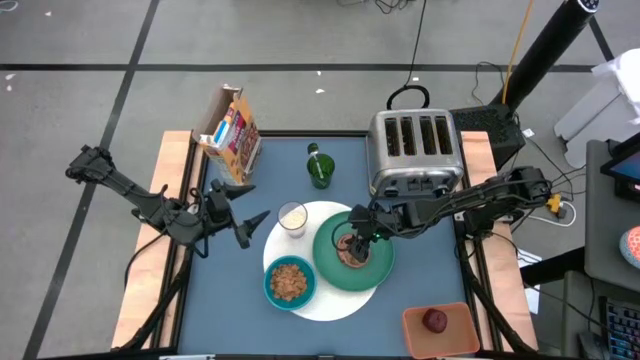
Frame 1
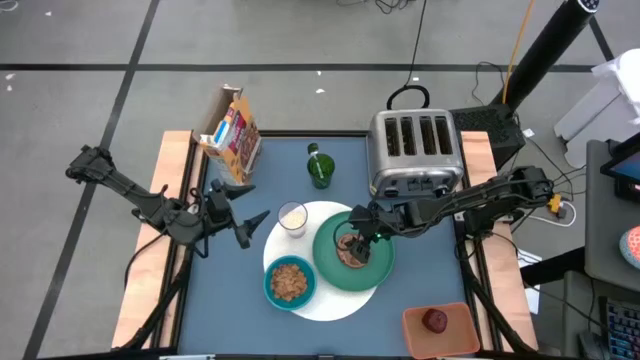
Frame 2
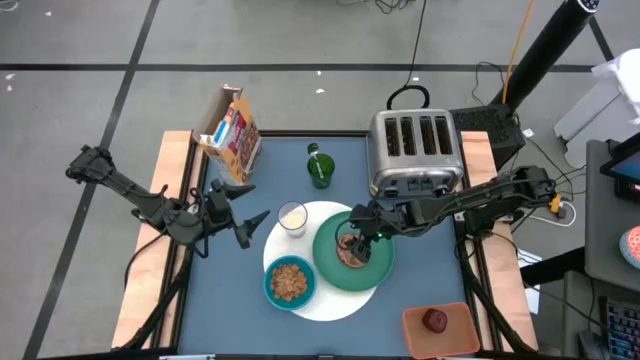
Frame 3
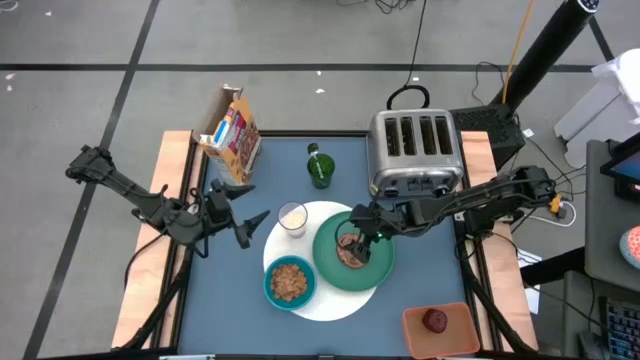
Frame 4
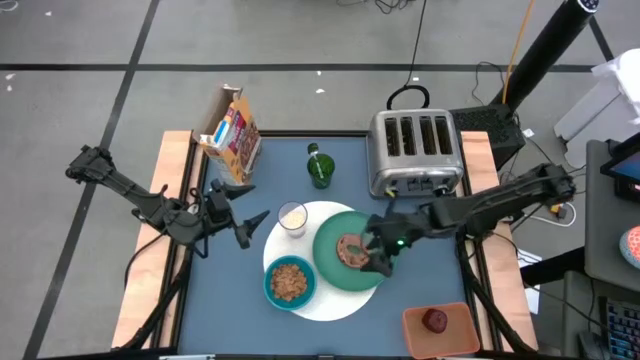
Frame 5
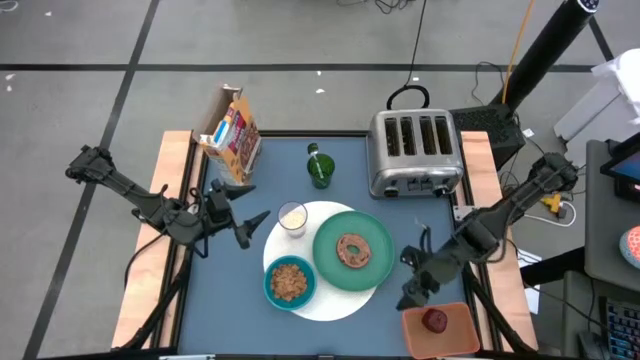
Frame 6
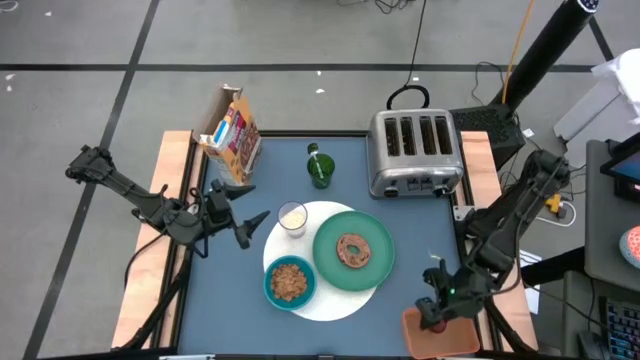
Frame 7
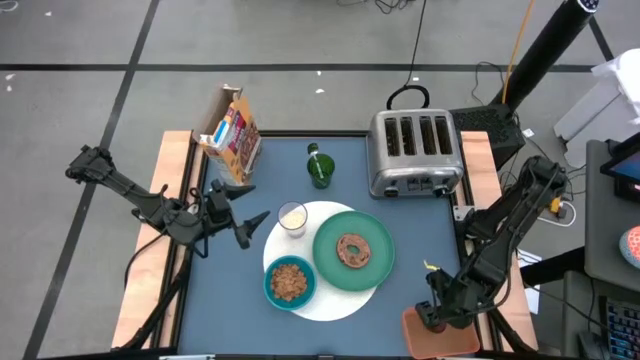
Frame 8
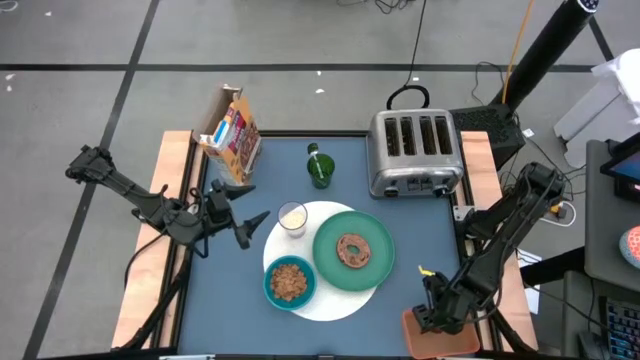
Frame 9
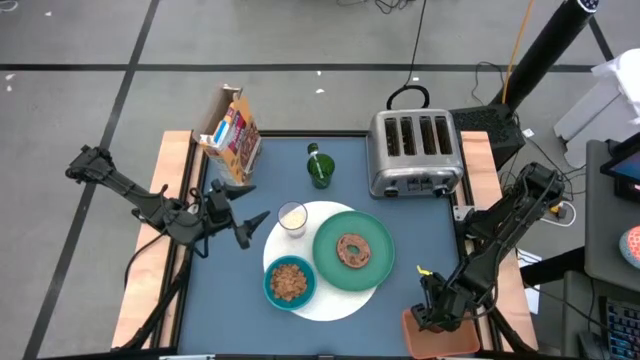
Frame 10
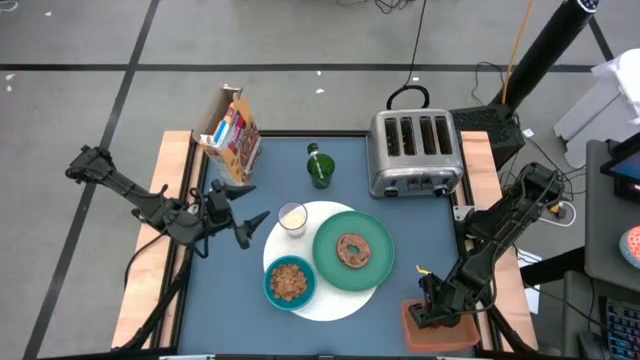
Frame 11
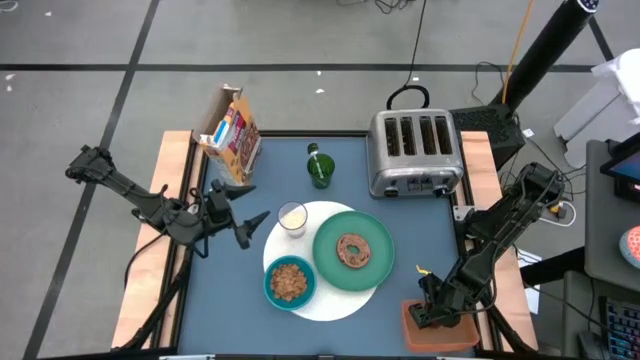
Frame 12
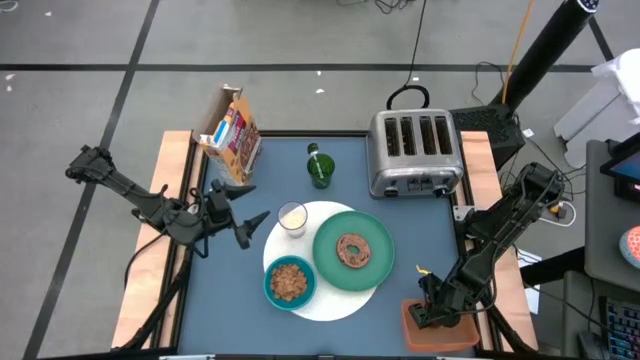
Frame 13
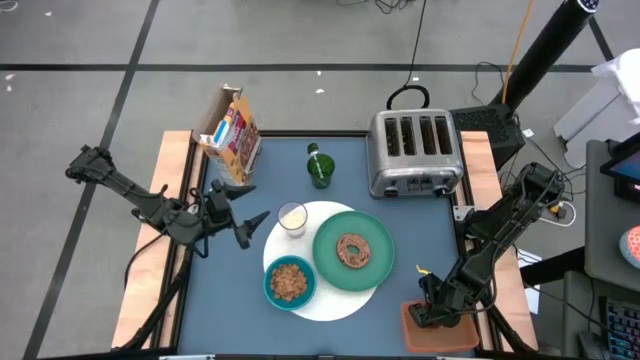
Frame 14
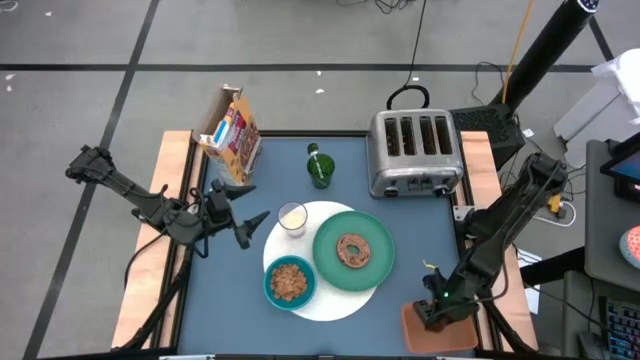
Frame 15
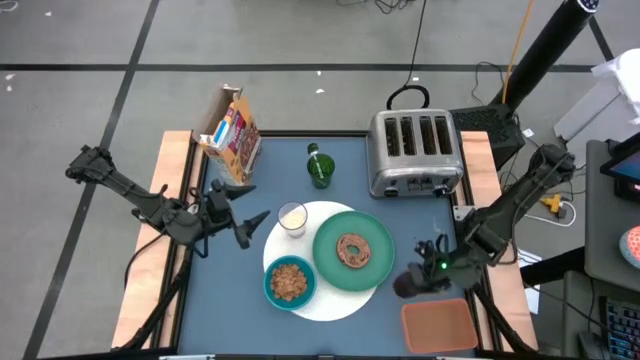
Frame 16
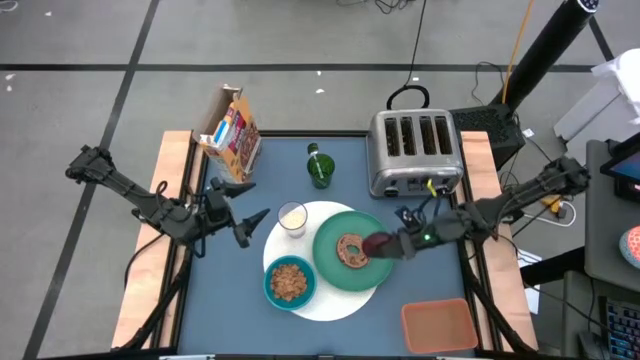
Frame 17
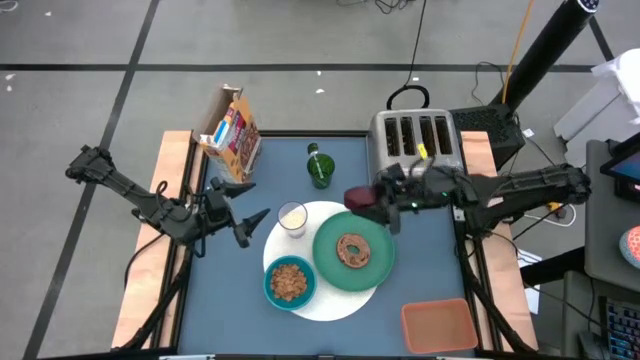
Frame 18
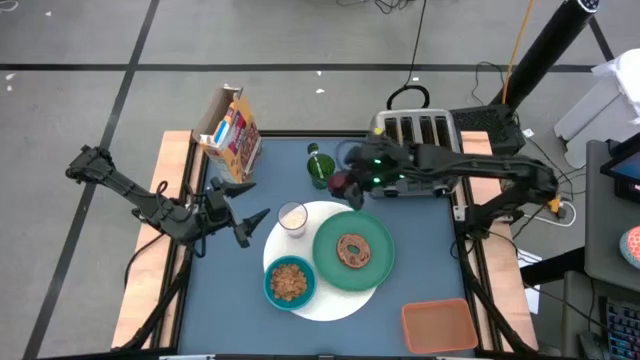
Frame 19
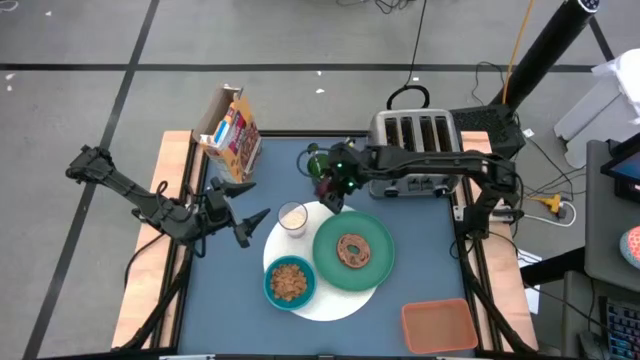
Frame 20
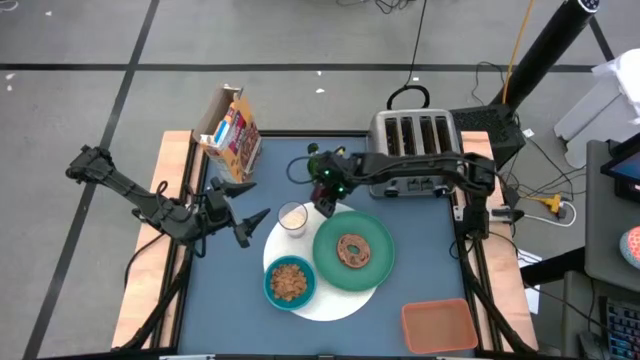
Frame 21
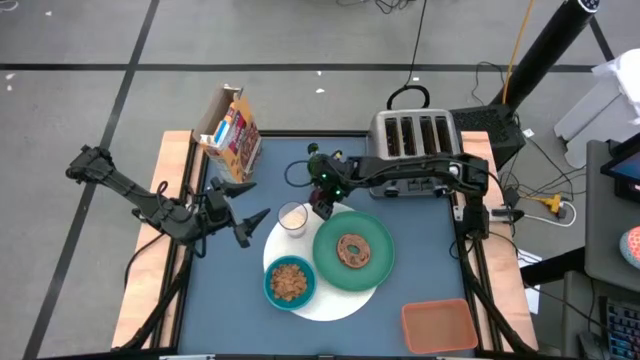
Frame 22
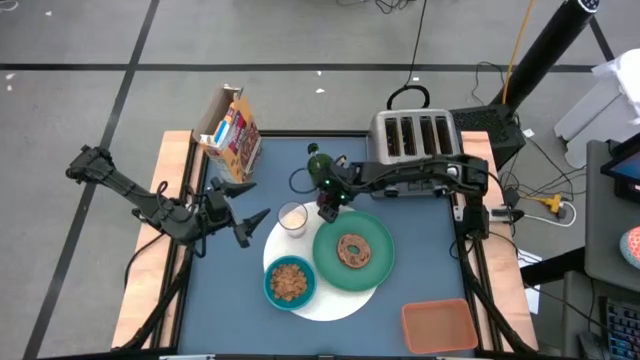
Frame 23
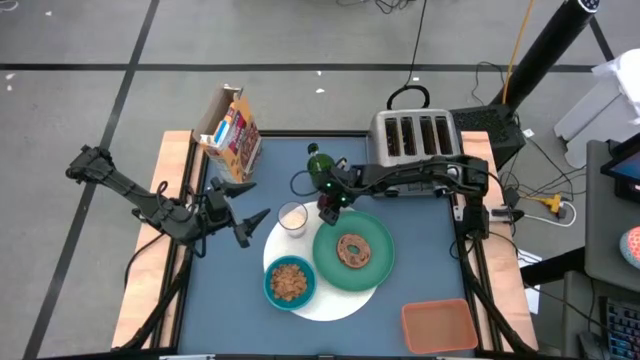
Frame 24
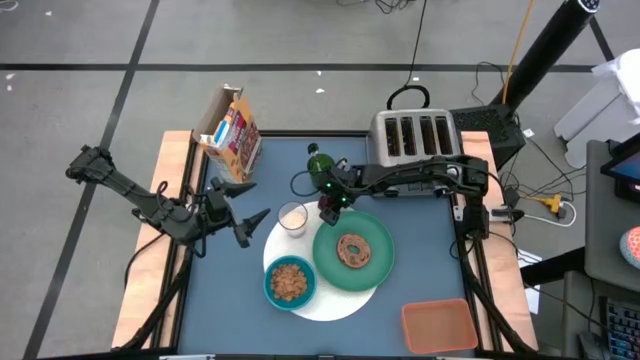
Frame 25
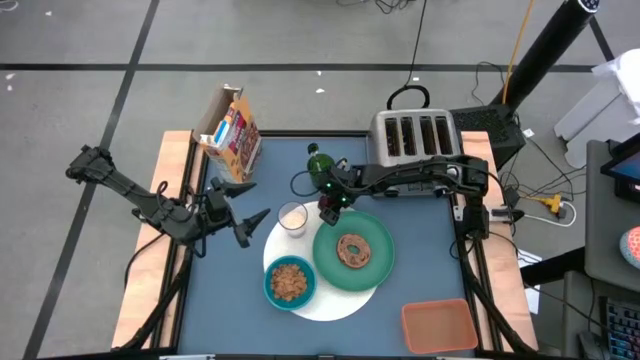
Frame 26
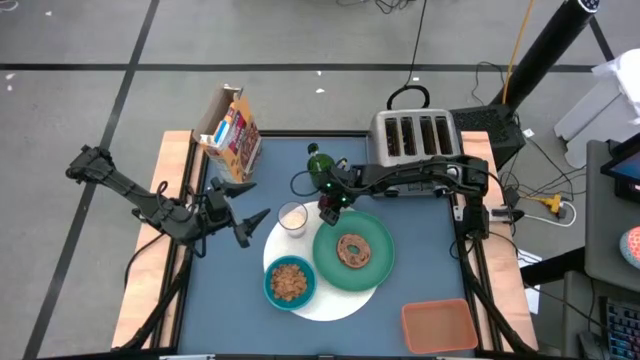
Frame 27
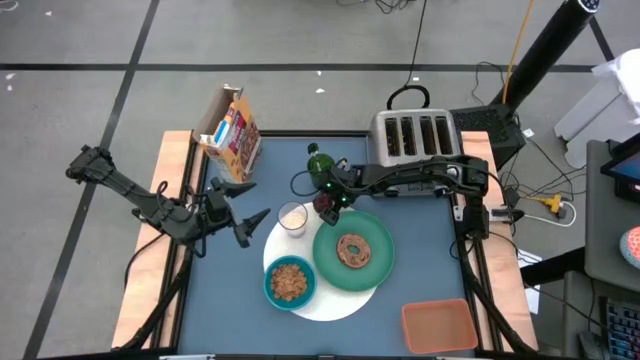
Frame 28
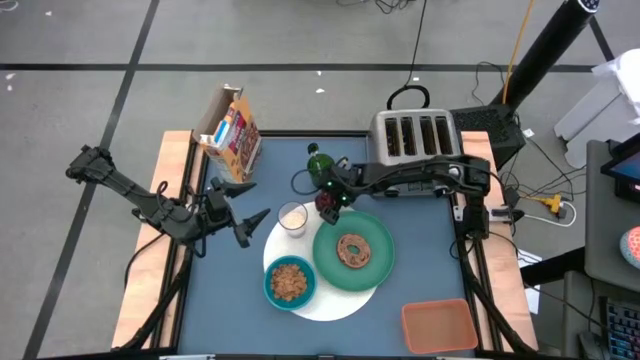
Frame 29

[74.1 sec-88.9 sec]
Task: Arrange a breakfast setting
Put the red apple on the white table mat to the right of the cup of milk
